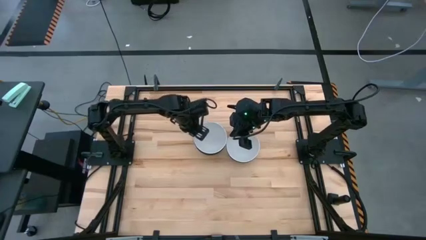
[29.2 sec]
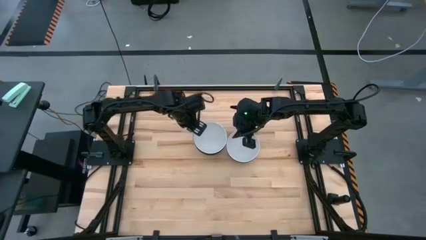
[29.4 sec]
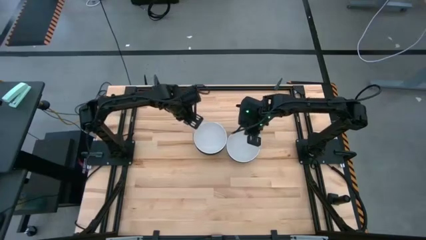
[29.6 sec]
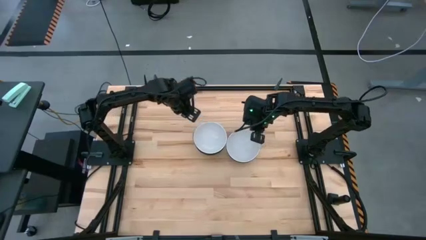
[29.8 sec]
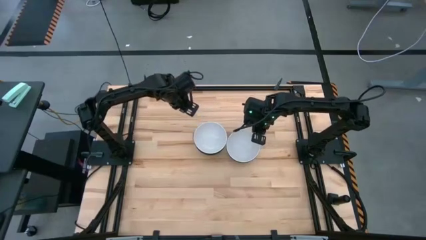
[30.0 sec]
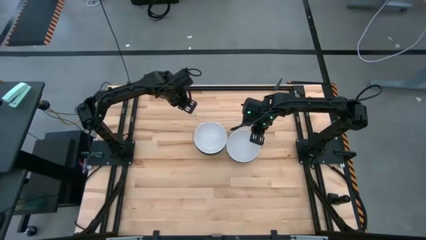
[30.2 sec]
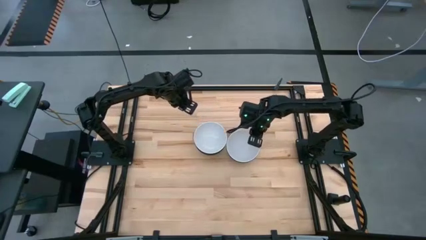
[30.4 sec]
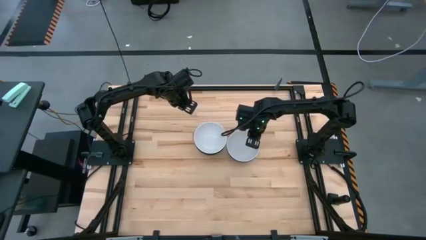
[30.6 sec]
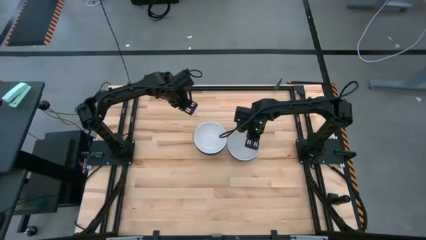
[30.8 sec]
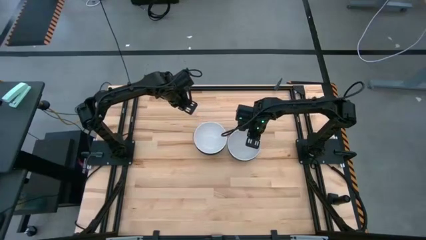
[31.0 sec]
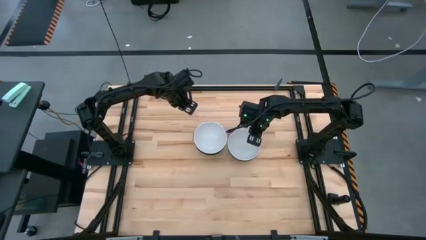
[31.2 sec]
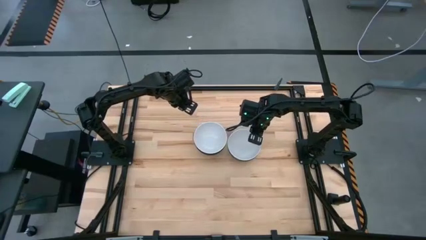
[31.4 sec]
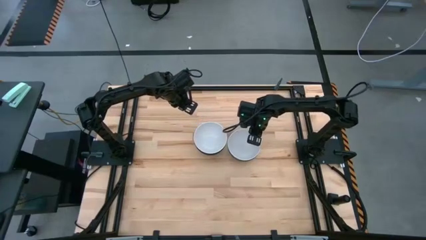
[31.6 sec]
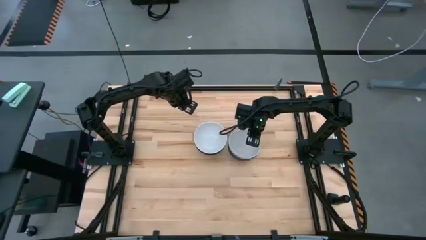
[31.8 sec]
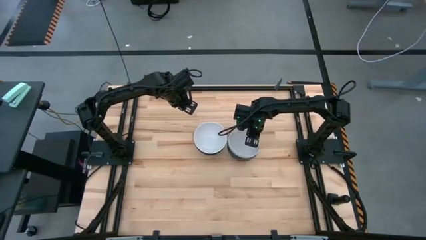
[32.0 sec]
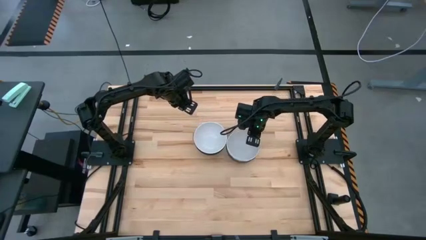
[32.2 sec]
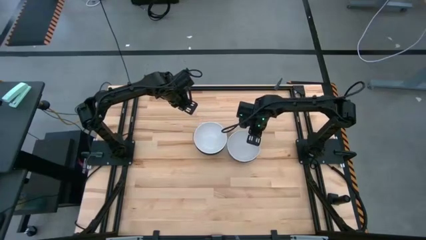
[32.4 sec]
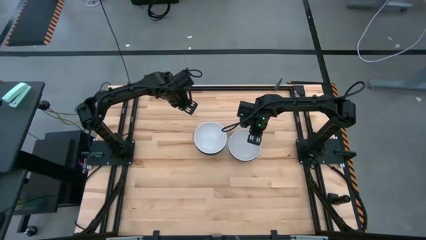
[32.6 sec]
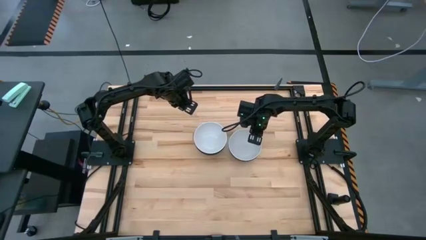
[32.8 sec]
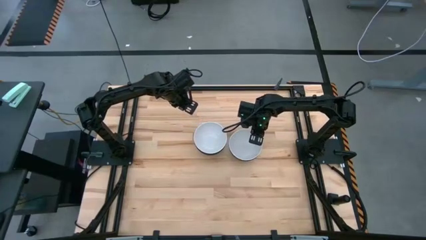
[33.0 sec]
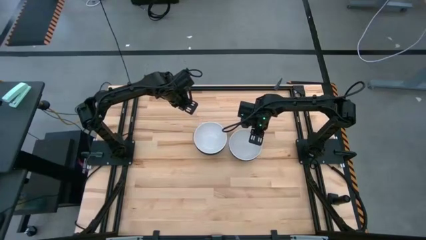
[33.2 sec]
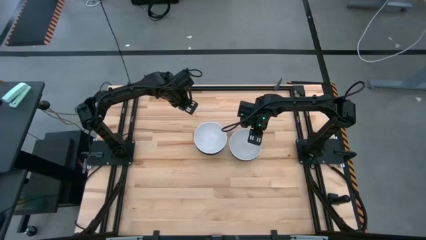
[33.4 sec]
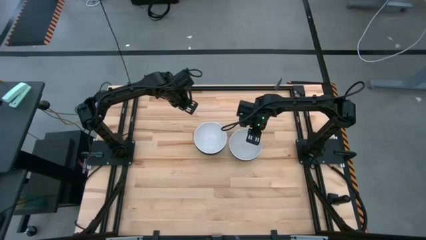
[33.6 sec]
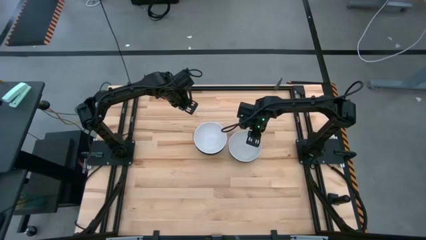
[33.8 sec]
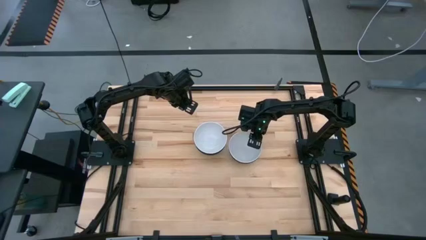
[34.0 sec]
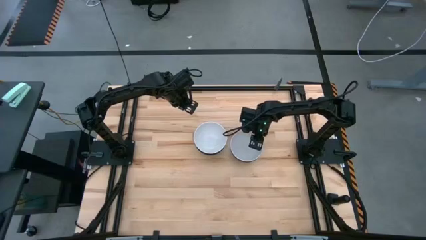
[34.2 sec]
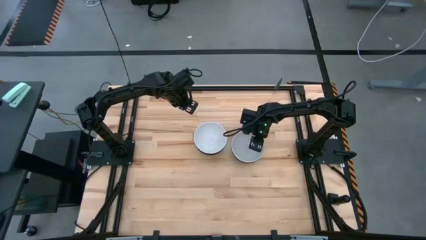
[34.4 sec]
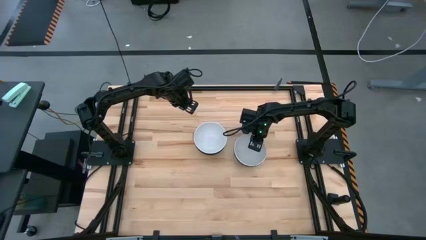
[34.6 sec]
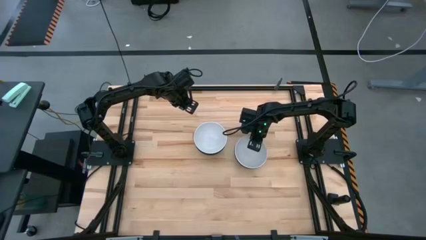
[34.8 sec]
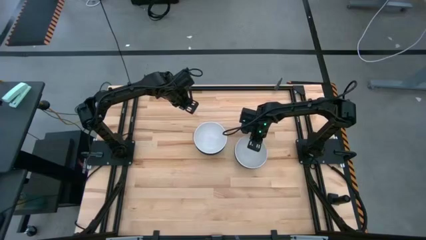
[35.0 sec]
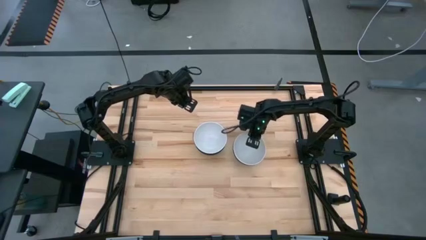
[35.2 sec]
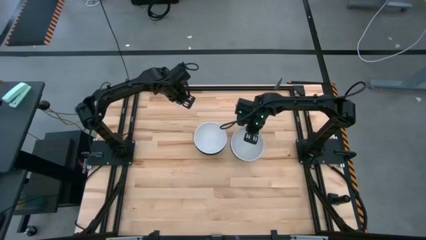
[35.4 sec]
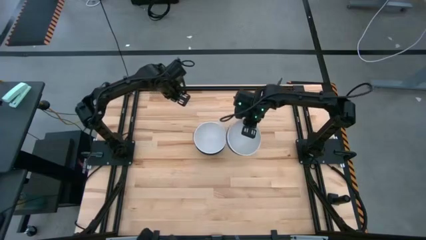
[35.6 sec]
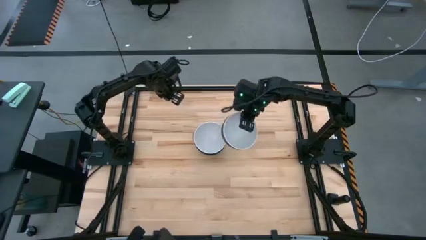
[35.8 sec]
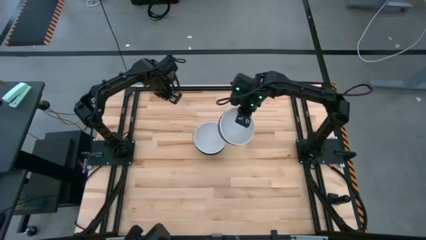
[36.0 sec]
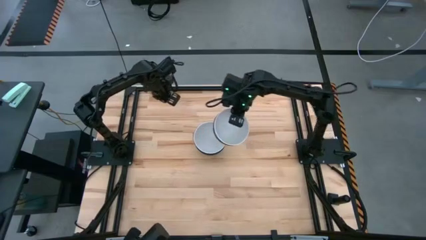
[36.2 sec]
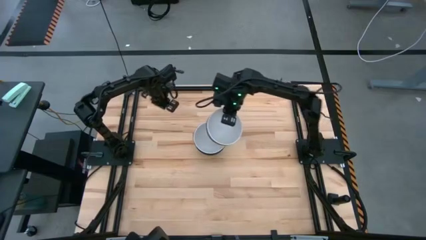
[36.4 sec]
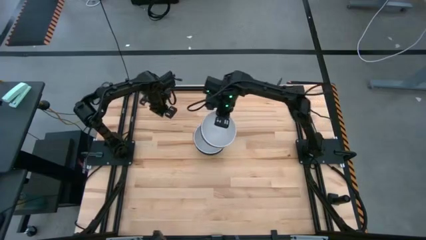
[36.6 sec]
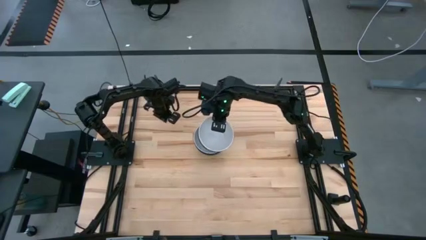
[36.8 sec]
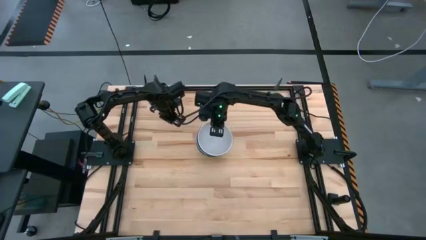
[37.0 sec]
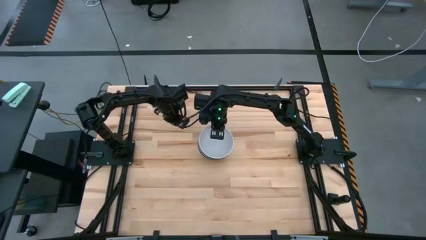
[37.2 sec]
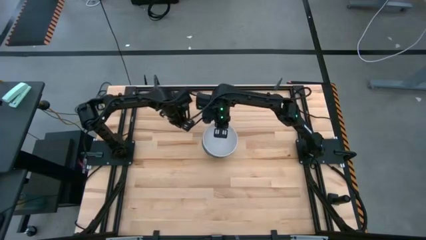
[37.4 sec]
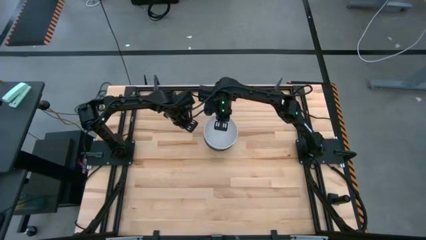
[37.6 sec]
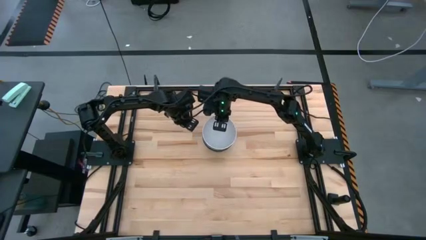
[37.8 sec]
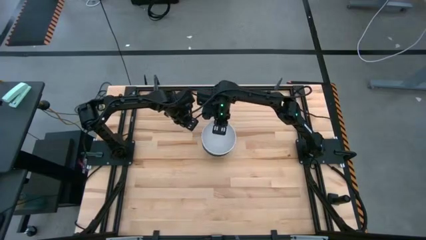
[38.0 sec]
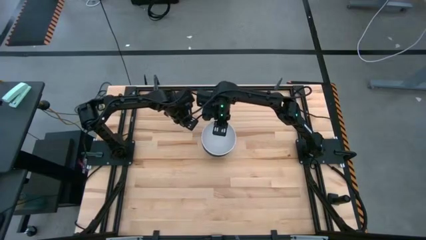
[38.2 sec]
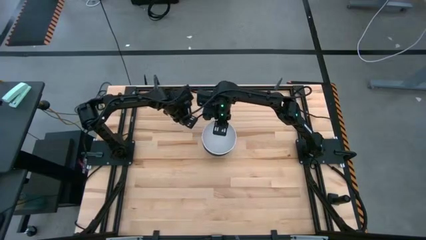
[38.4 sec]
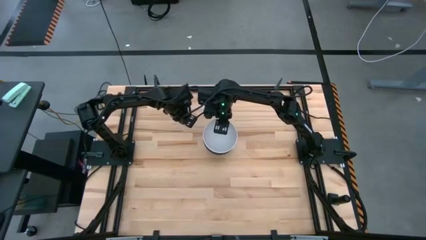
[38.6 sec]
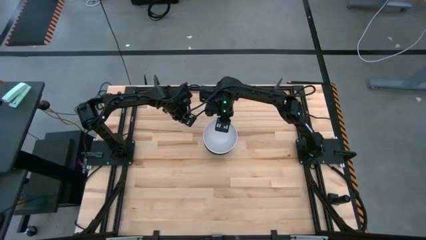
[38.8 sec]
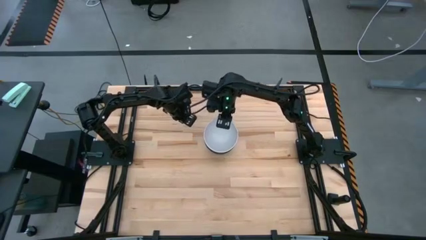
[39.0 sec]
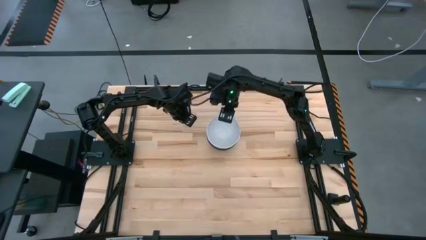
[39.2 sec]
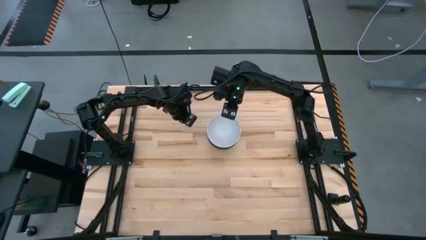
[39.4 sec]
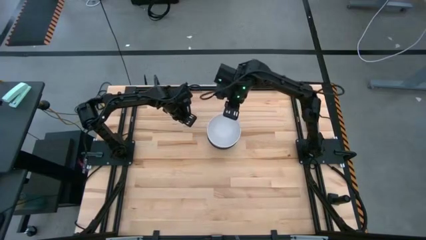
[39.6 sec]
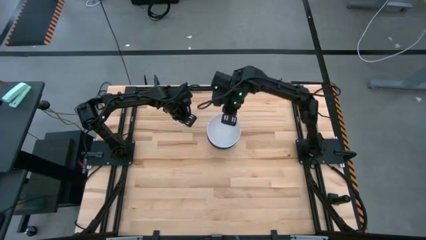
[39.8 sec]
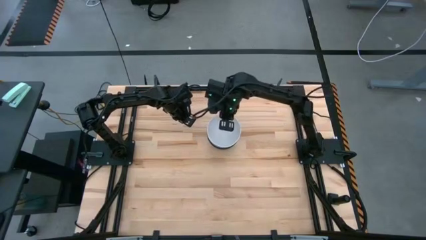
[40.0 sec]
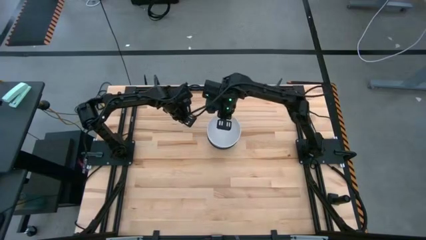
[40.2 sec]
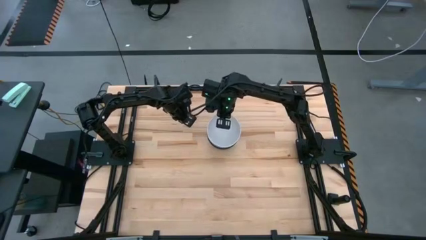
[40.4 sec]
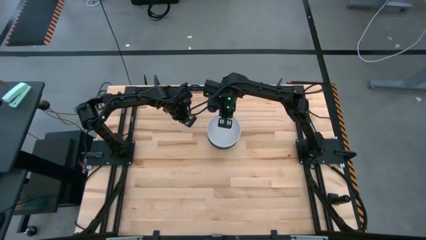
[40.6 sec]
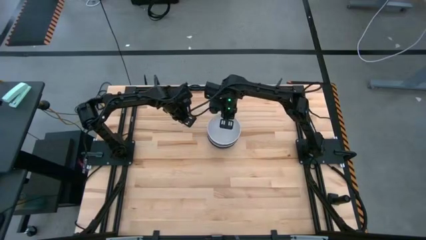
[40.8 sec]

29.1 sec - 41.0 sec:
Task: Nest bowls inside each other
Stack the right bowls on top of the left bowls

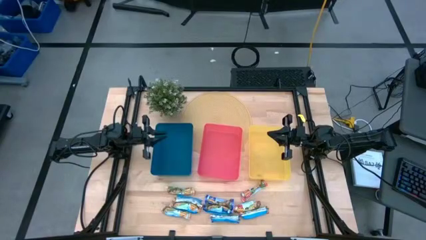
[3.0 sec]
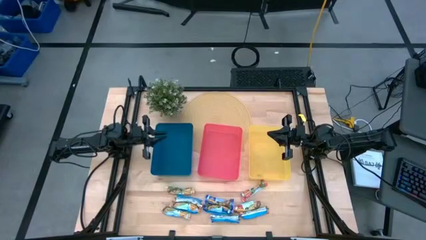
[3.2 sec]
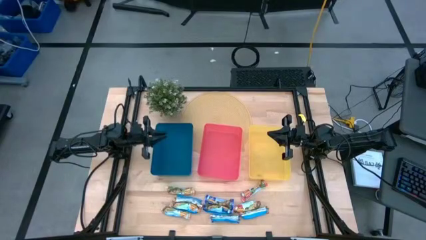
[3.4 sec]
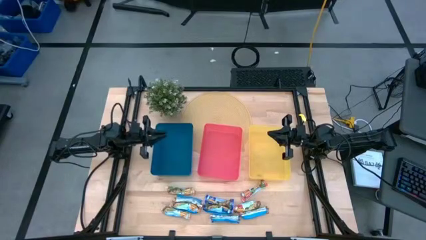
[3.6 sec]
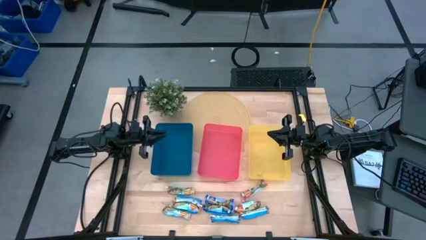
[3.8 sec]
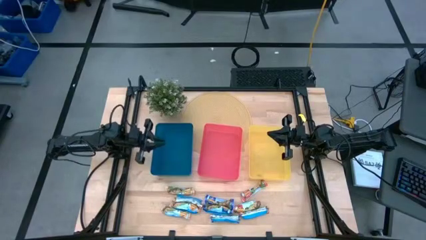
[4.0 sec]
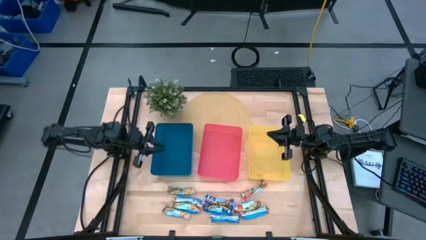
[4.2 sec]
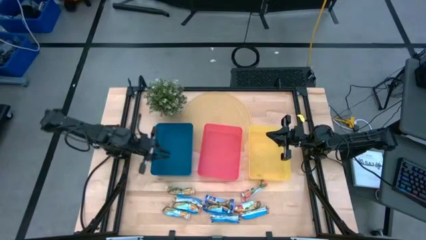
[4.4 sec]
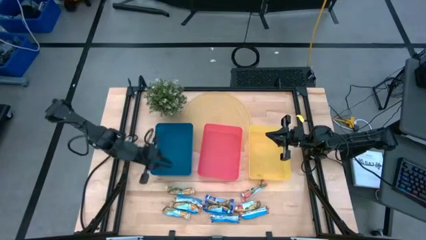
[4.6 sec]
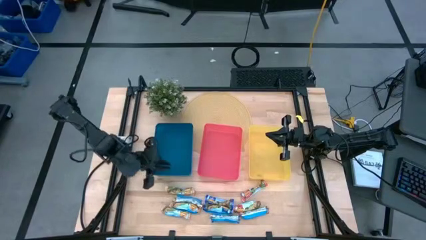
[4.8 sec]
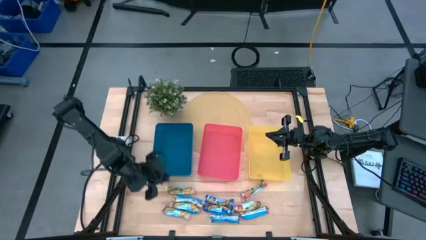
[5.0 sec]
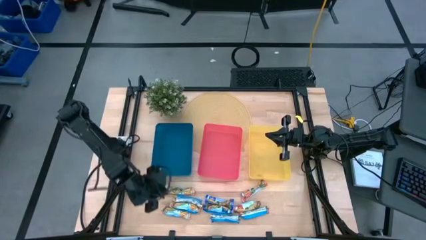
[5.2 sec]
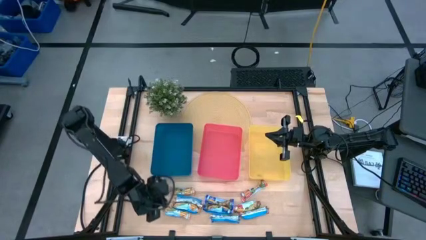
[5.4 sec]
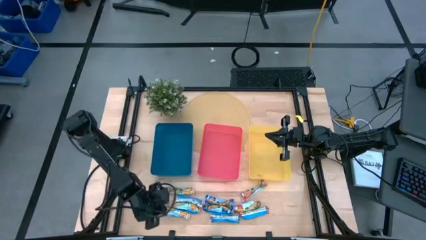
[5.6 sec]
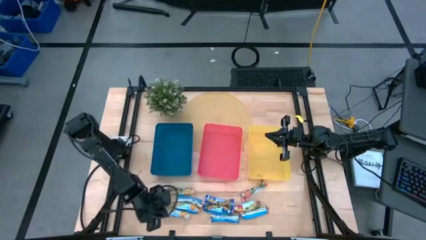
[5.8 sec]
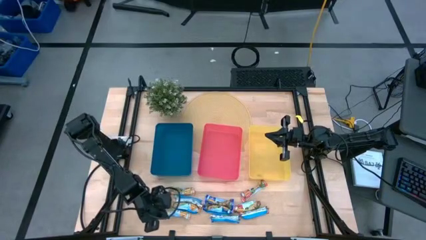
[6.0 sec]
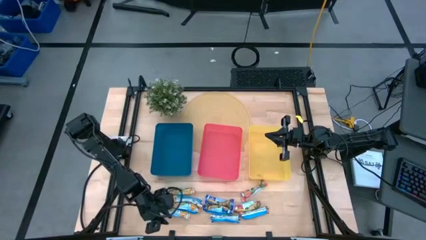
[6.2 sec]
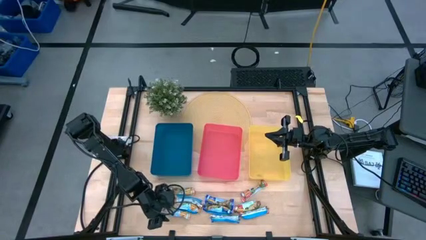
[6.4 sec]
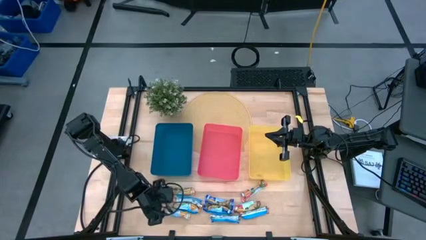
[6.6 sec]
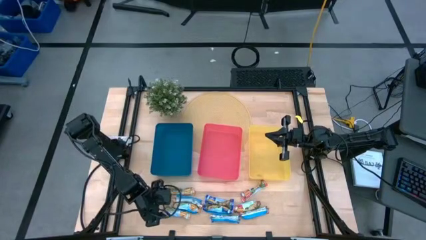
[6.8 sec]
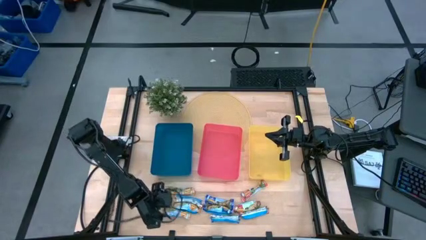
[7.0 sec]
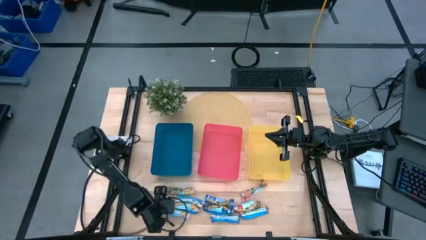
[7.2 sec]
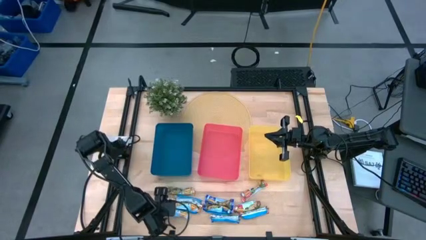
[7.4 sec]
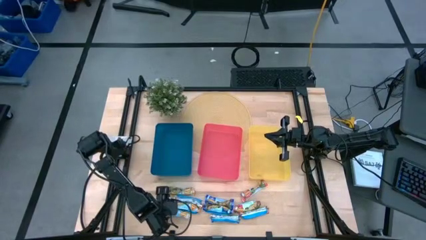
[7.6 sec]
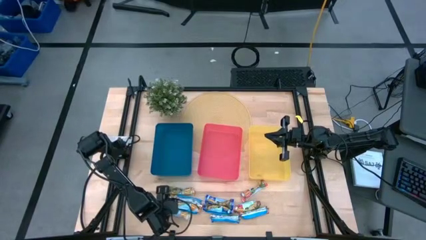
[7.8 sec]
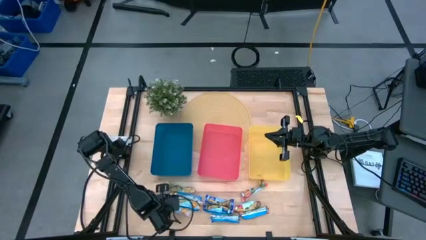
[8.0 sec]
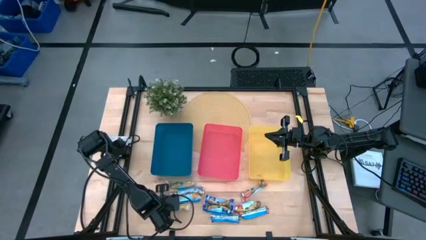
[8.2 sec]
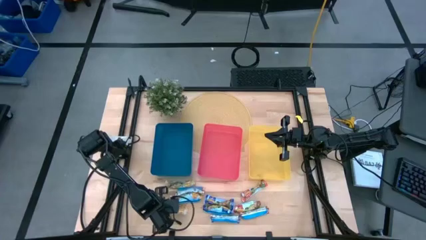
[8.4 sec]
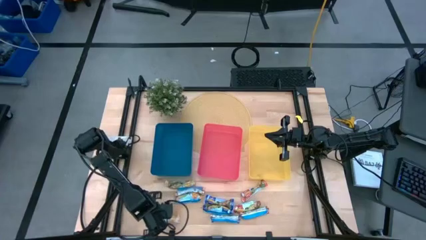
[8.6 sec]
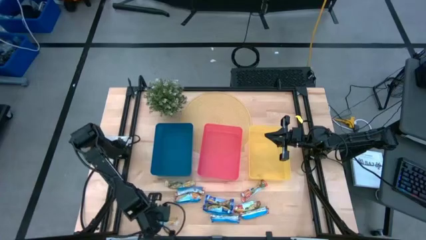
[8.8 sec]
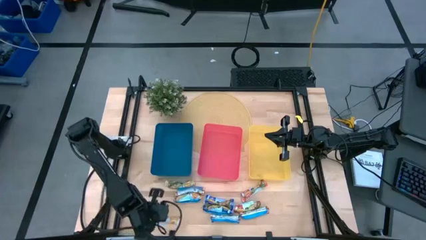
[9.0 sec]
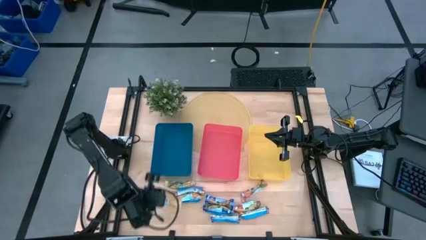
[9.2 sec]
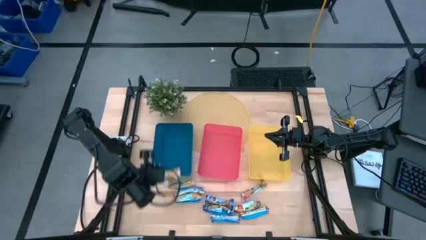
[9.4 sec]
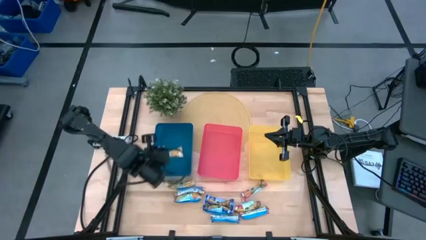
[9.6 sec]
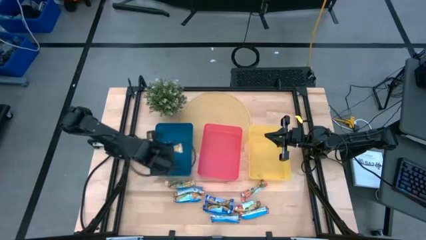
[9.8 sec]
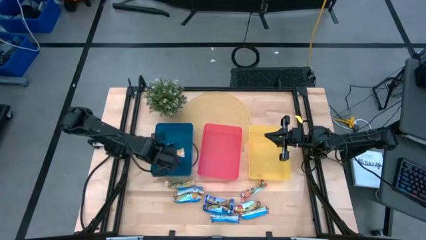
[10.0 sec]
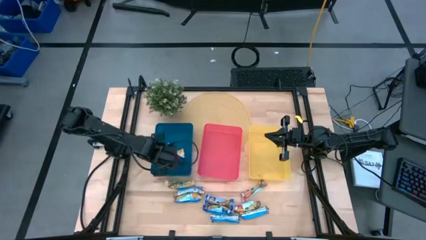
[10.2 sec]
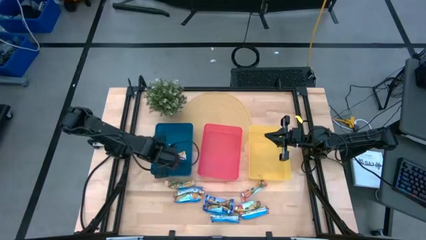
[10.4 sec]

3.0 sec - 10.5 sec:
Task: Pick and place Granola Bars by type
Put the orange granola bar into the blue bin
